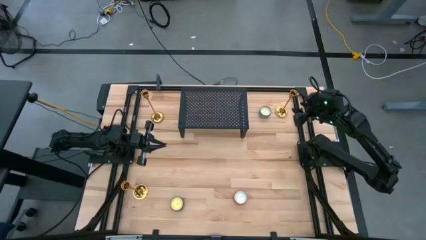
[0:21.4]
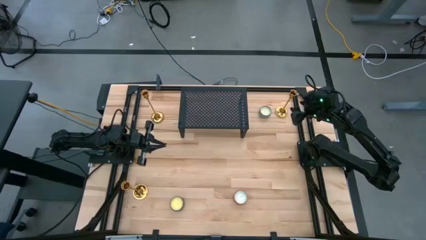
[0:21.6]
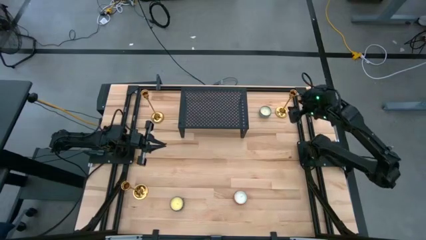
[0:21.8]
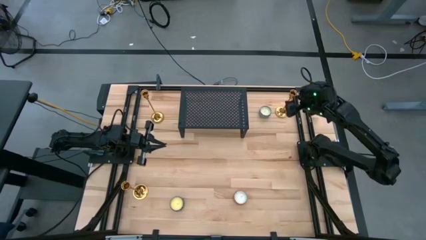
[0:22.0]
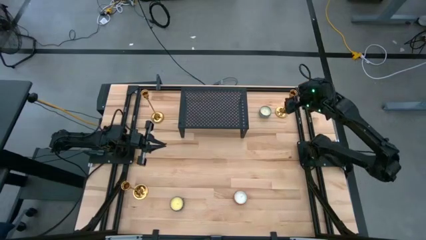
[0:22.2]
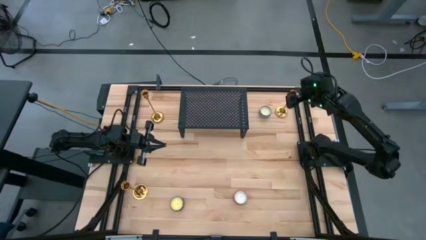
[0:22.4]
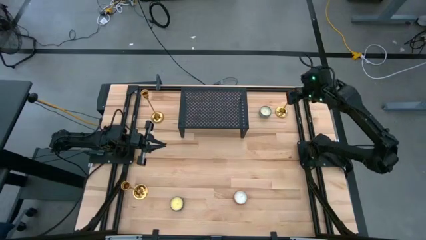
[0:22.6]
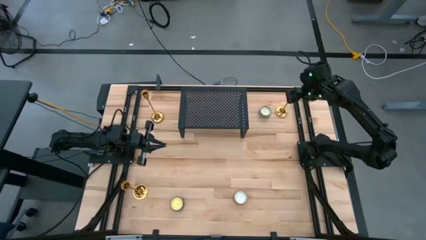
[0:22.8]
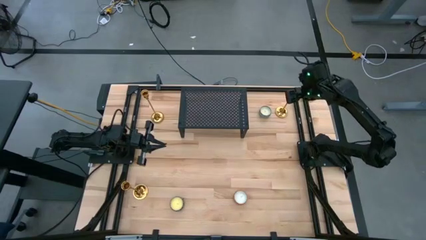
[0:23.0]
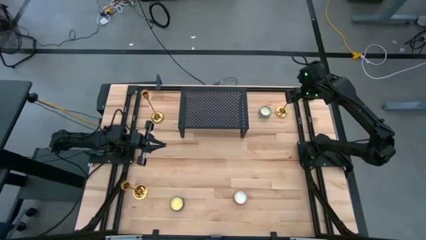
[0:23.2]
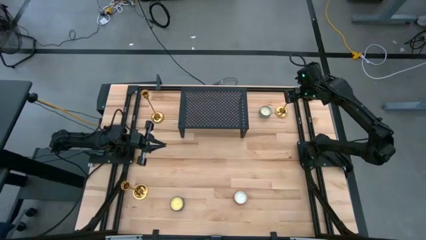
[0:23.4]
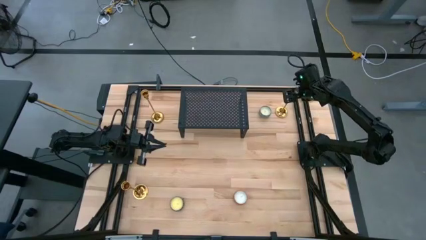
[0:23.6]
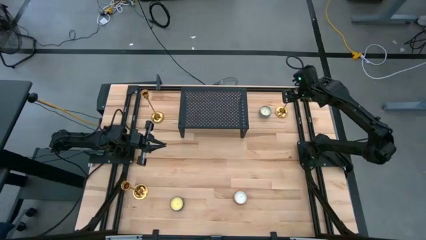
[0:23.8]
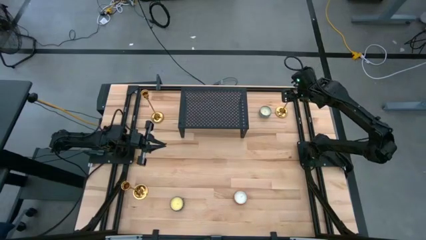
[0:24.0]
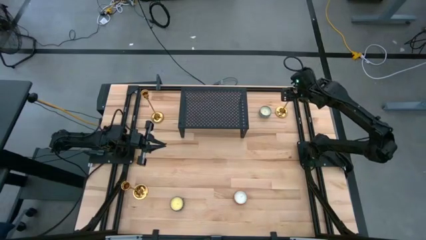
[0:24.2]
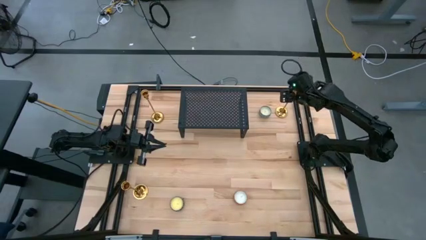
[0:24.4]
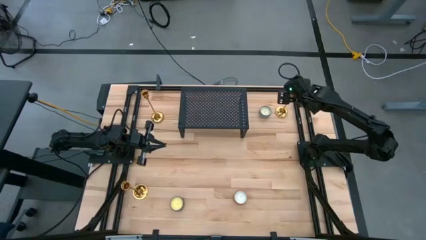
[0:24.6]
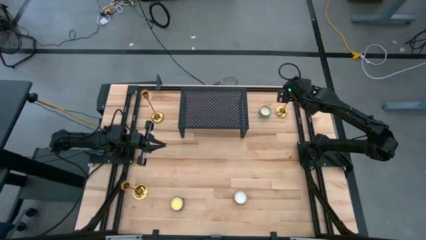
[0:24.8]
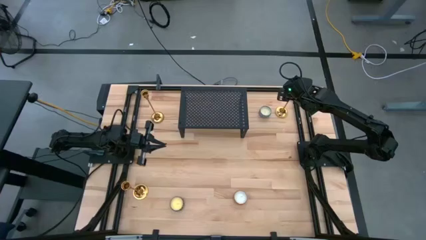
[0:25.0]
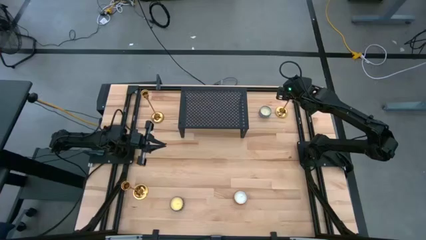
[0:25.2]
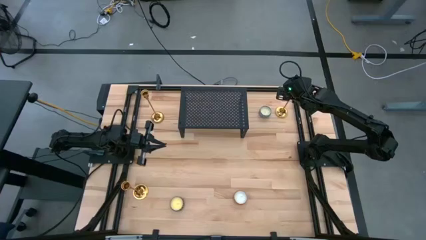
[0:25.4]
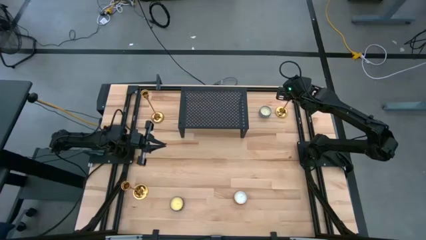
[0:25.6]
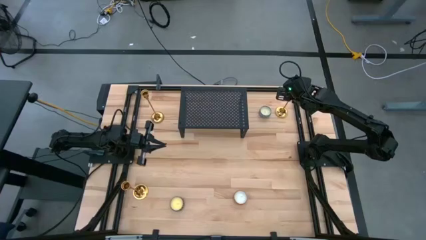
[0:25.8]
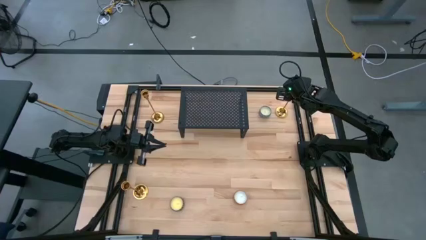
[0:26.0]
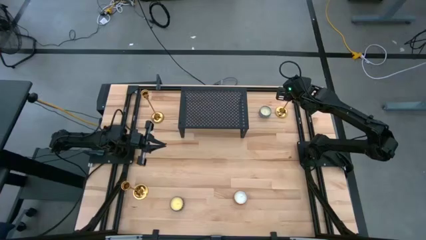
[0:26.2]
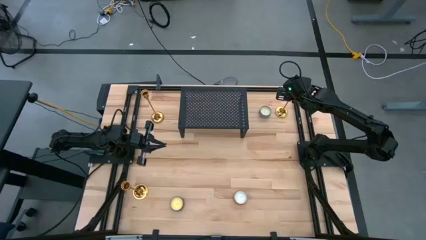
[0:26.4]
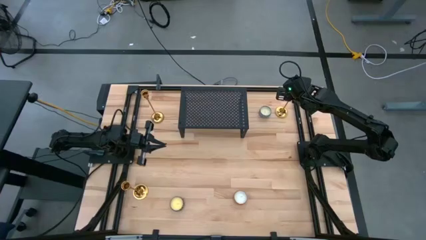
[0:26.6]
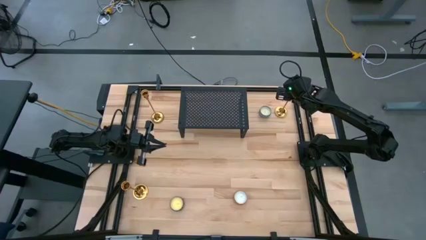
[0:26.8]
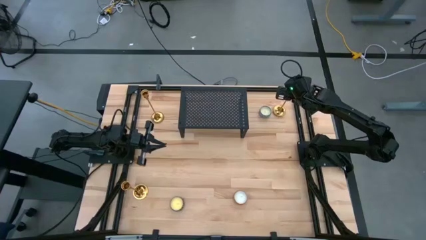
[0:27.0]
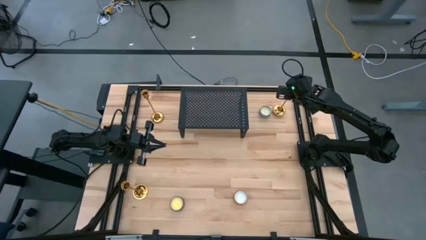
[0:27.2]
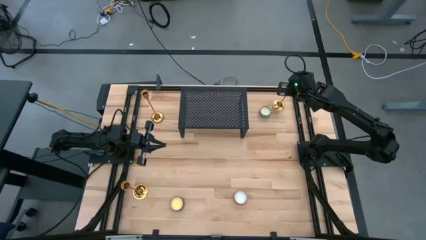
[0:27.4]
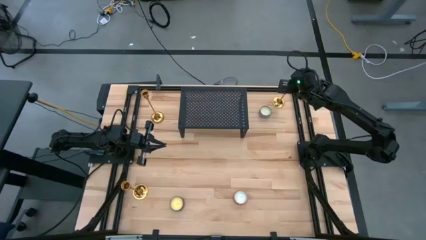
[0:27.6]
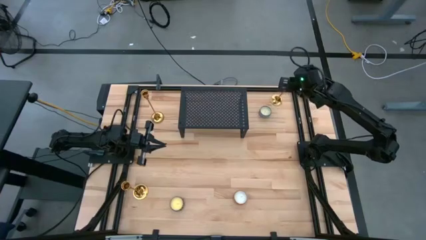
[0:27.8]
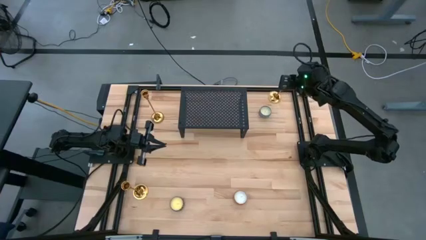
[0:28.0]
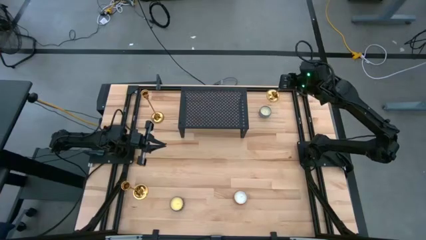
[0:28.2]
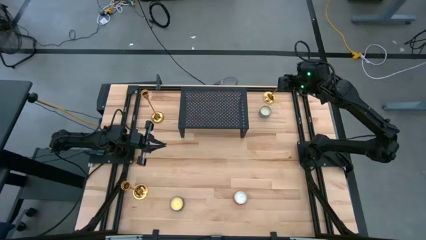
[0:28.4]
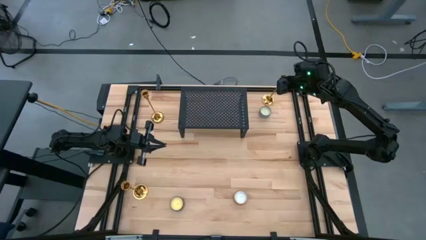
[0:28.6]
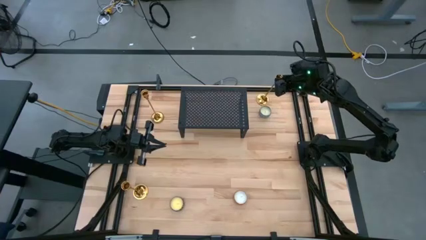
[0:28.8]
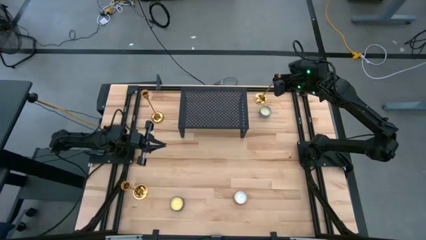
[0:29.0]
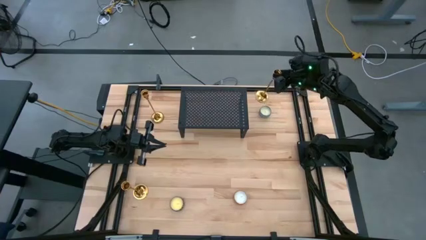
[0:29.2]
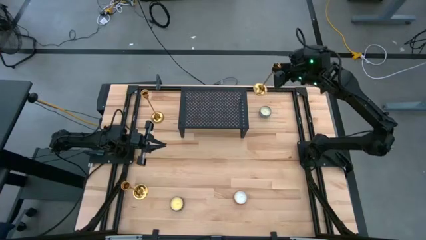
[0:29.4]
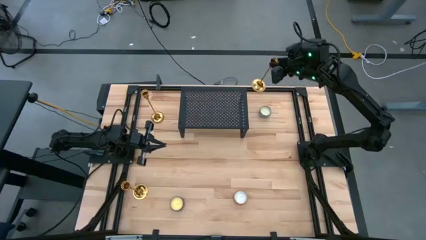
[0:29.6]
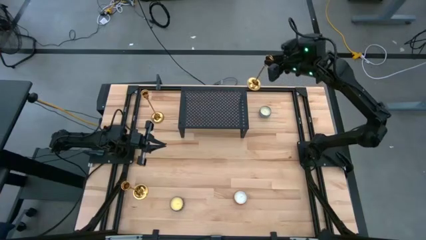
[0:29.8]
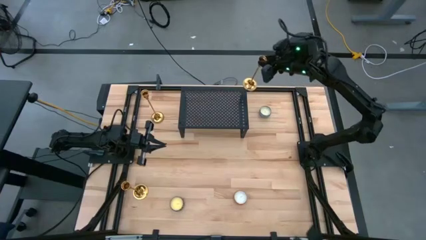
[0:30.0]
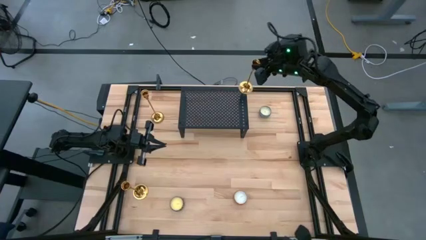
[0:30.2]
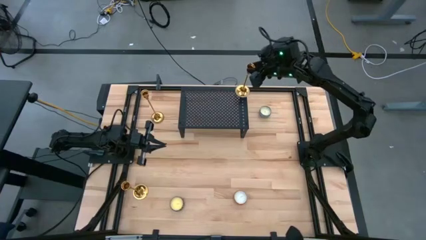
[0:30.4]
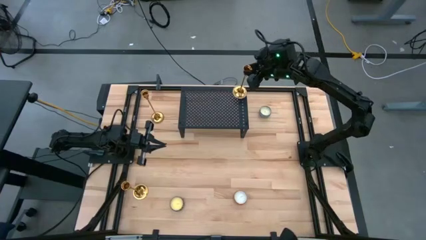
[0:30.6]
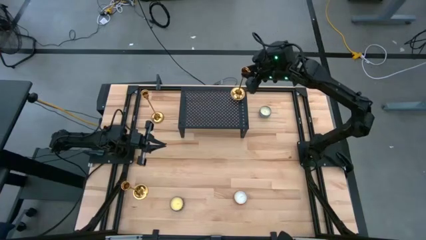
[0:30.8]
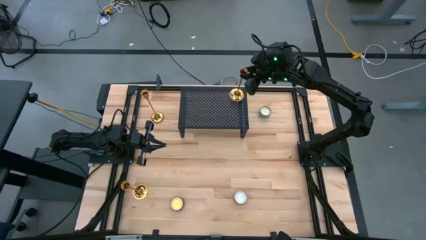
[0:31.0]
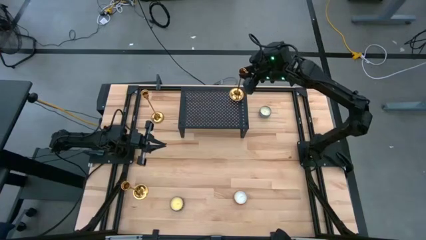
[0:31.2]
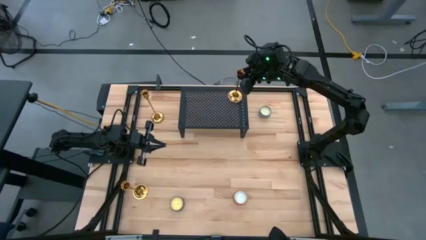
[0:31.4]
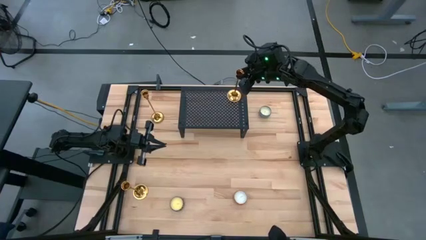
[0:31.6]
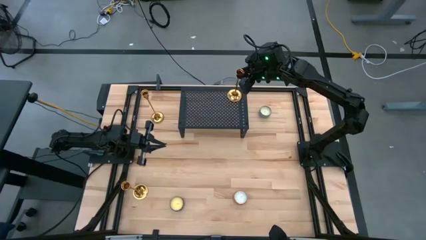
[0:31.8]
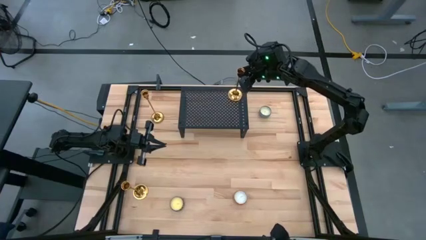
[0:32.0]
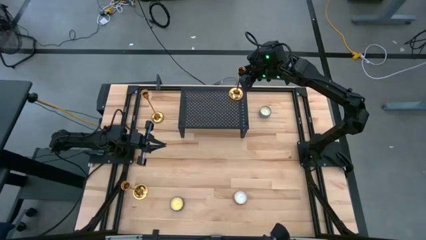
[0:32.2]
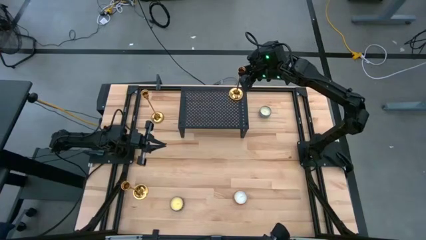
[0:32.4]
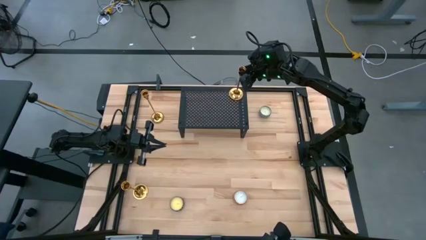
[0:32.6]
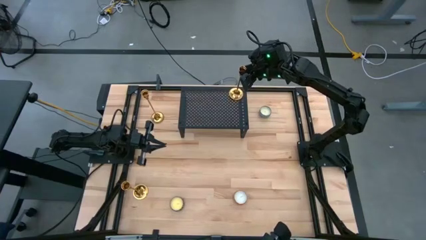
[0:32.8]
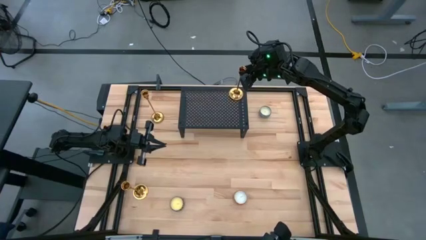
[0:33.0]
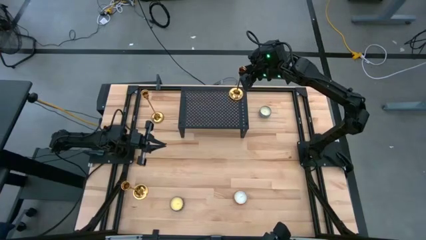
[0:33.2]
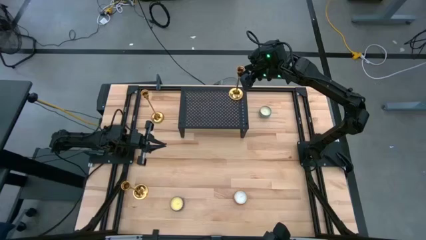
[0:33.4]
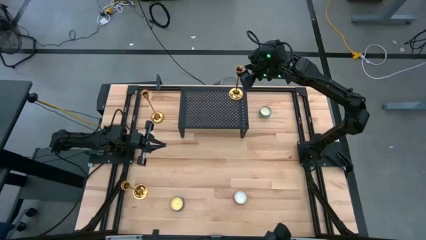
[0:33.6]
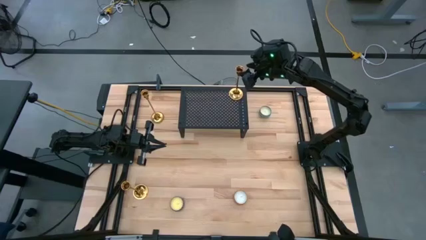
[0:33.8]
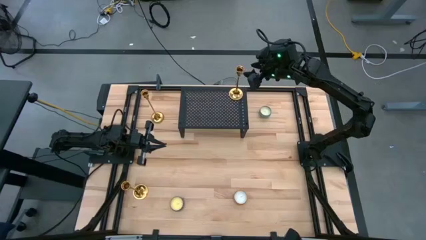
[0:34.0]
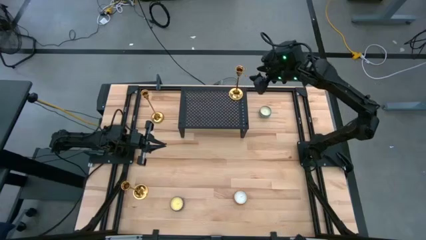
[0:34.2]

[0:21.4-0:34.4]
Task: Pick & Place candle stick holders
Put the top right gold candle holder on the shelf
